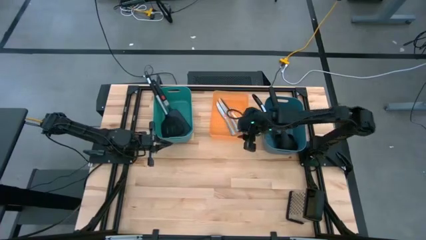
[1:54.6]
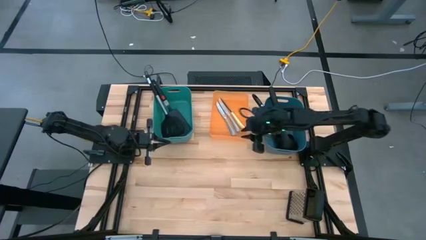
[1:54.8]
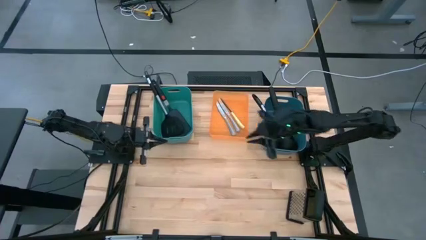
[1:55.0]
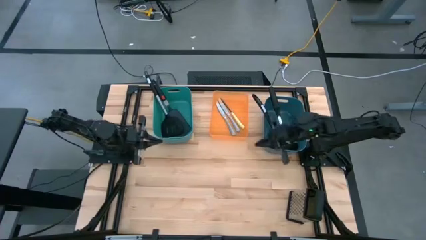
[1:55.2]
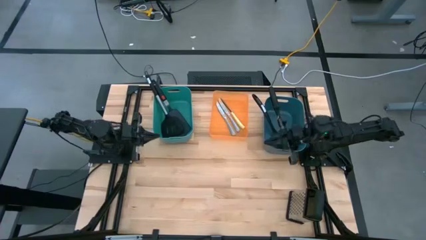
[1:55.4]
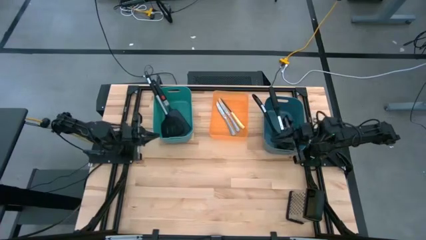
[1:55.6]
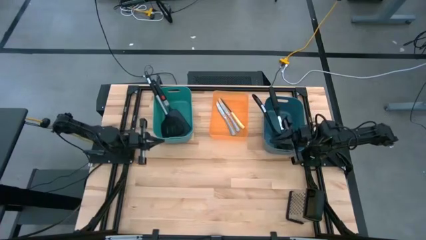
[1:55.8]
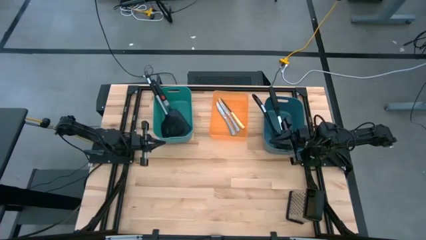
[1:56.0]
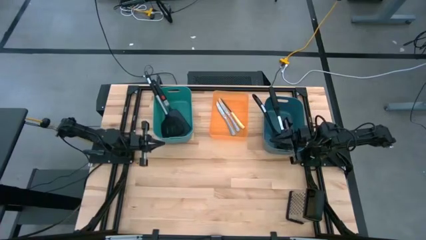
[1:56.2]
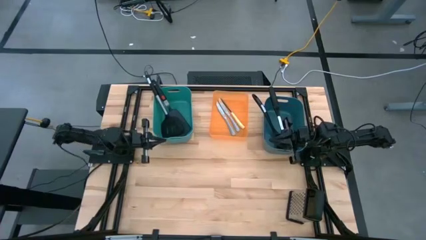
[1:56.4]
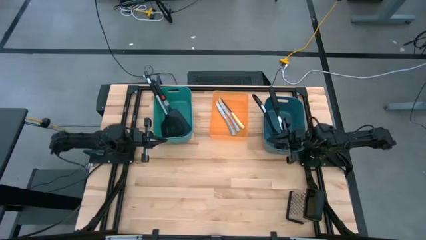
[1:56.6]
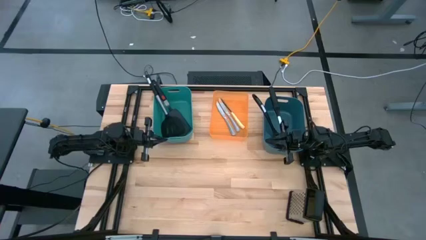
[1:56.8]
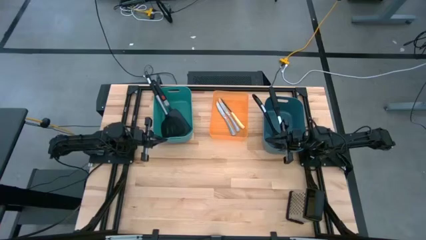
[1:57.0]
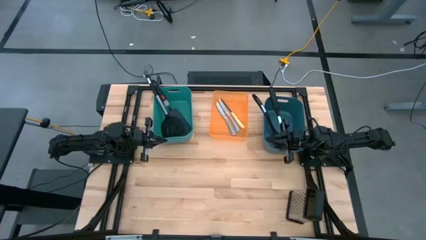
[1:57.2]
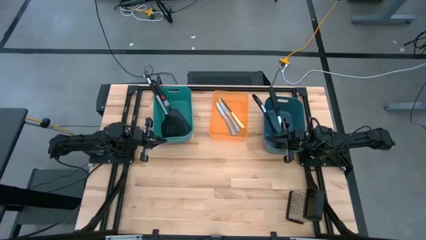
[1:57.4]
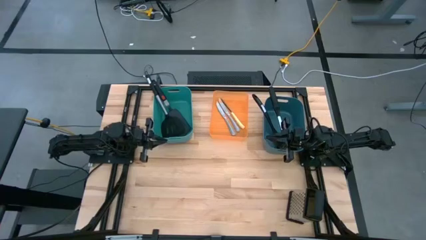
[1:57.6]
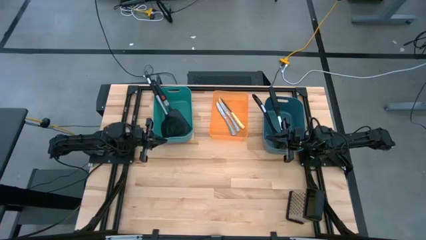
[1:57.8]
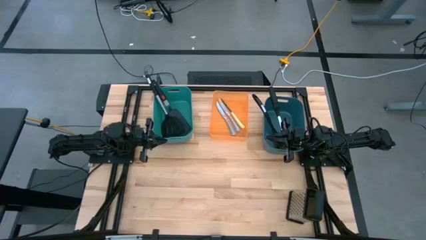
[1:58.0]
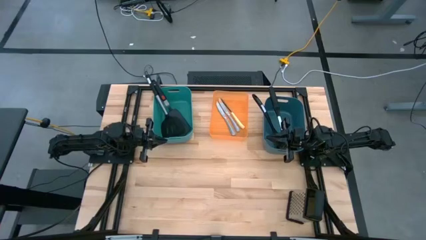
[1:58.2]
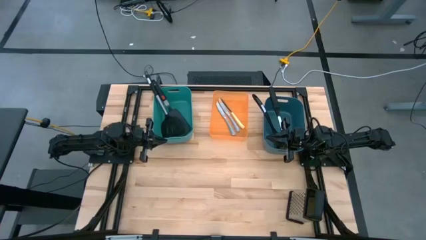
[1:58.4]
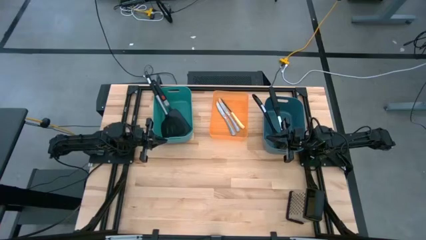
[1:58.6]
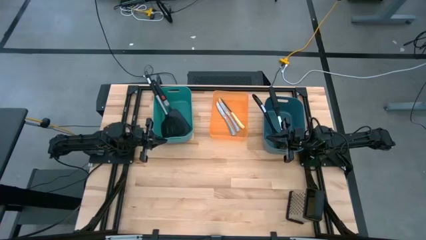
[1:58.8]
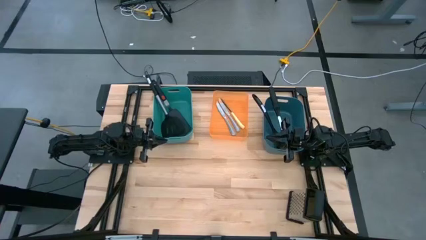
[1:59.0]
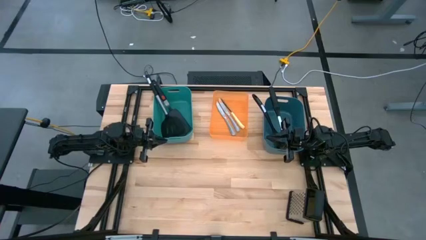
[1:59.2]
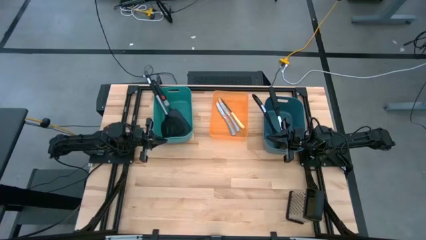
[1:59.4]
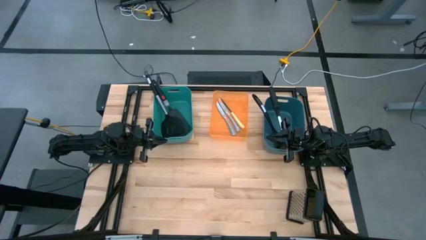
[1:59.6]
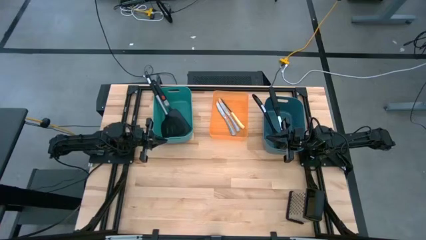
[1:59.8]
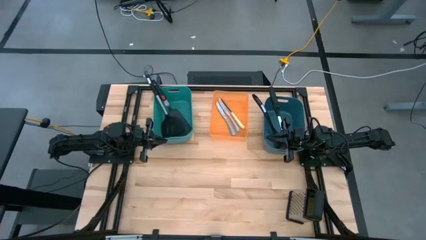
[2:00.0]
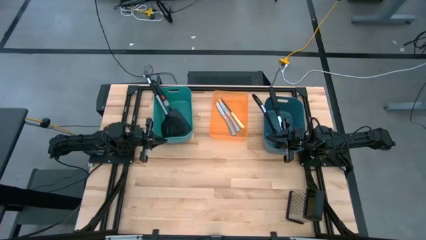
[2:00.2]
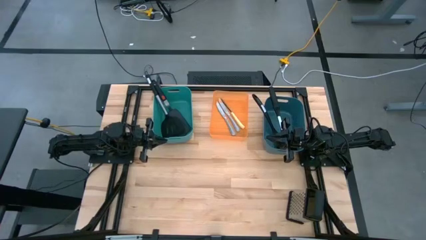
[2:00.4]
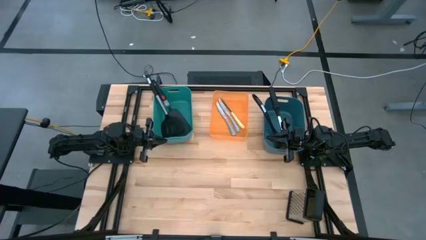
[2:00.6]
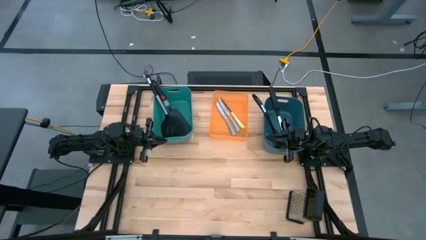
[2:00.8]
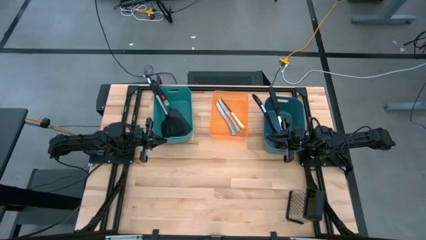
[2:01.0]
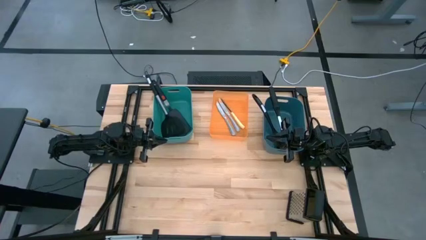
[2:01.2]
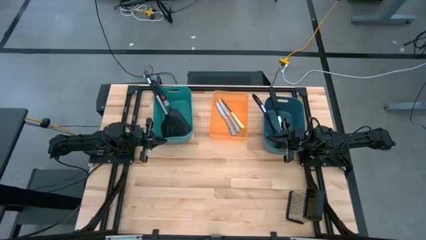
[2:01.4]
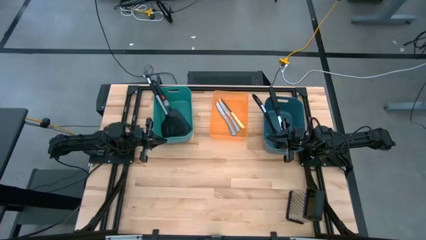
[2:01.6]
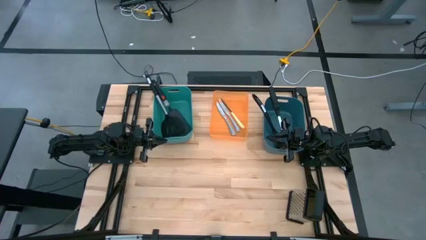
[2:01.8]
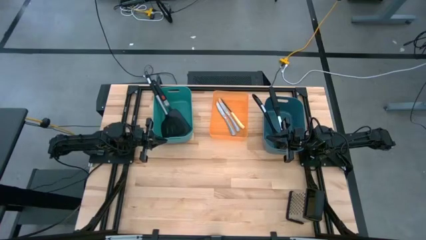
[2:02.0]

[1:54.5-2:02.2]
Task: Pick & Place Kitchen Items
Return to Home Position

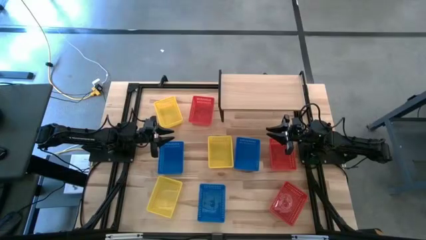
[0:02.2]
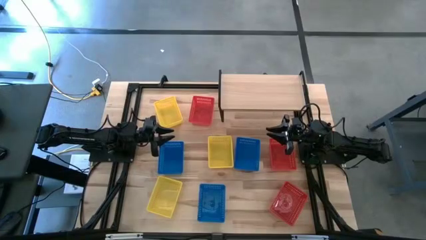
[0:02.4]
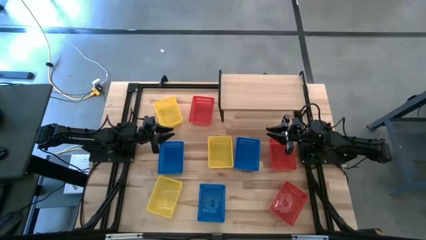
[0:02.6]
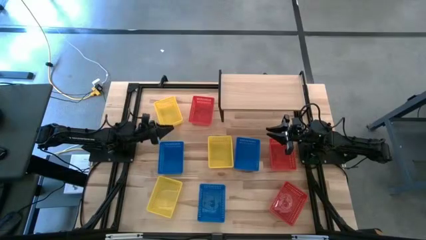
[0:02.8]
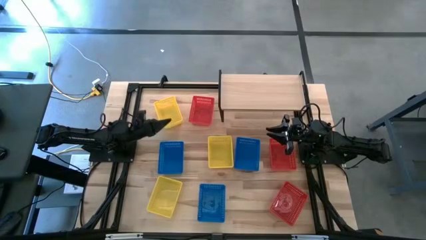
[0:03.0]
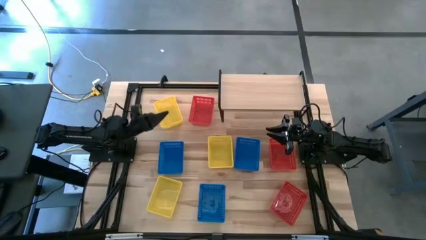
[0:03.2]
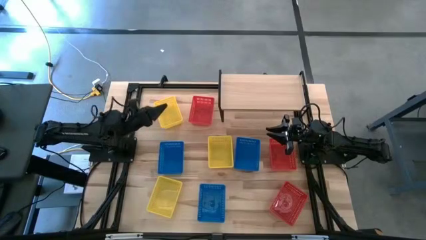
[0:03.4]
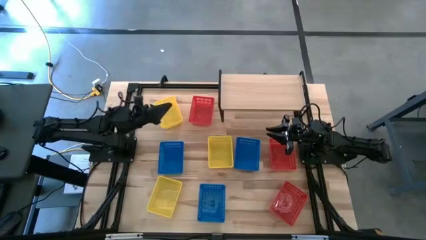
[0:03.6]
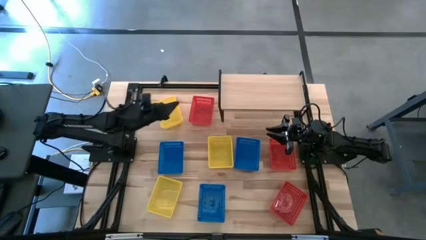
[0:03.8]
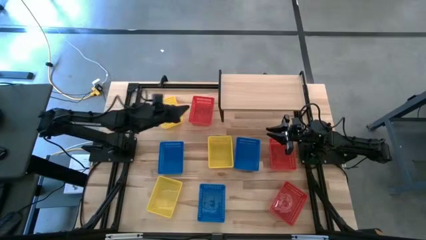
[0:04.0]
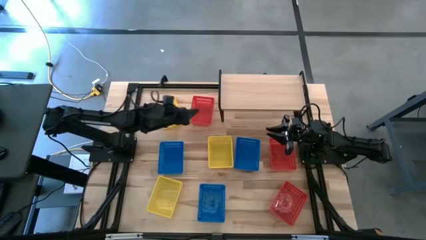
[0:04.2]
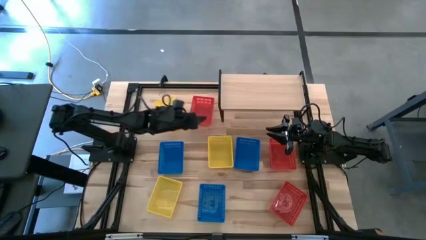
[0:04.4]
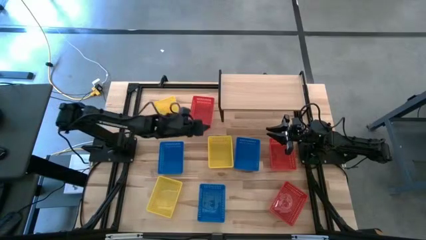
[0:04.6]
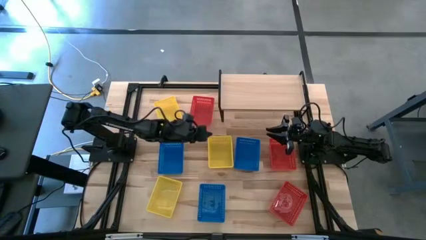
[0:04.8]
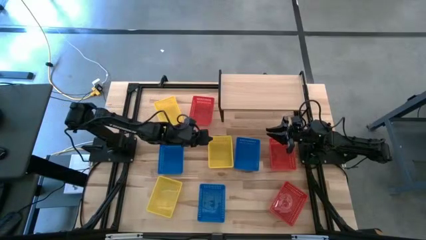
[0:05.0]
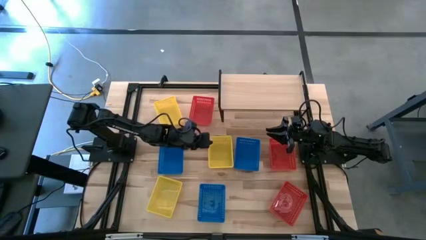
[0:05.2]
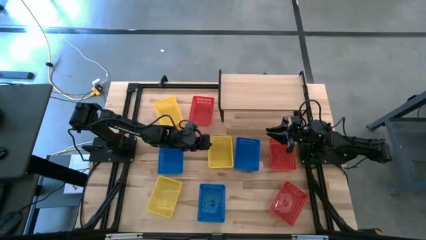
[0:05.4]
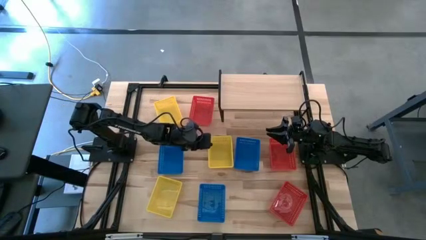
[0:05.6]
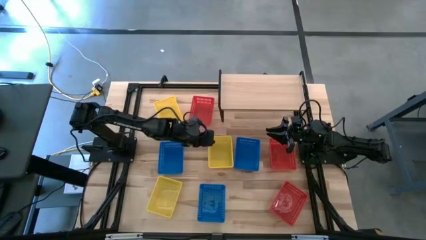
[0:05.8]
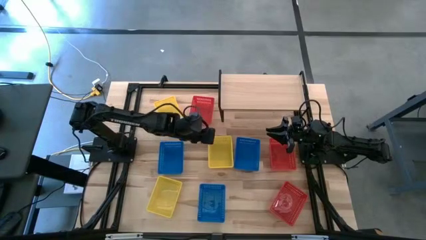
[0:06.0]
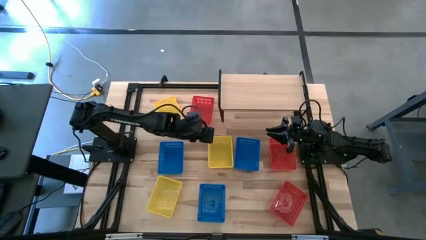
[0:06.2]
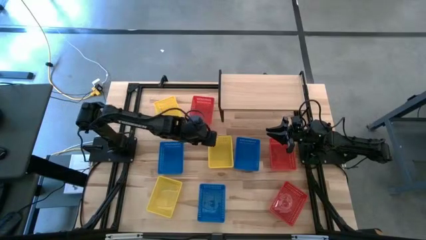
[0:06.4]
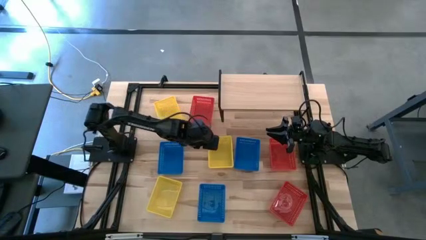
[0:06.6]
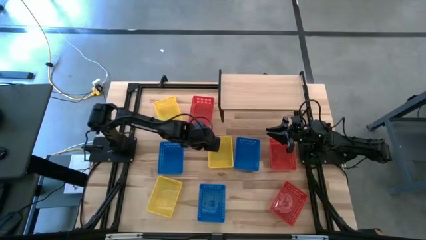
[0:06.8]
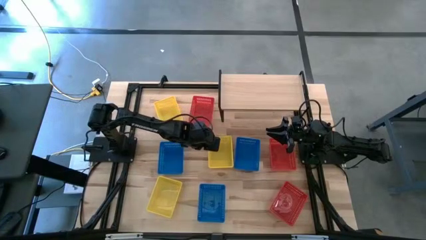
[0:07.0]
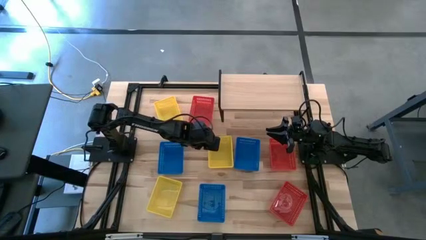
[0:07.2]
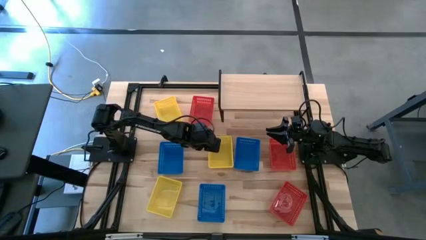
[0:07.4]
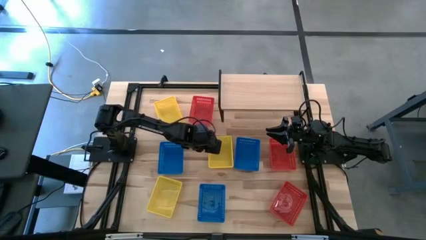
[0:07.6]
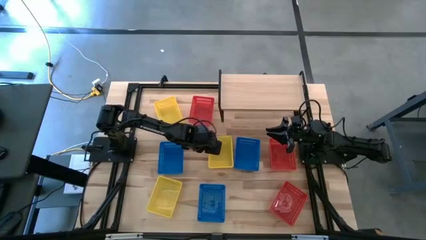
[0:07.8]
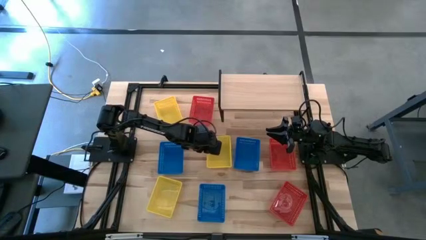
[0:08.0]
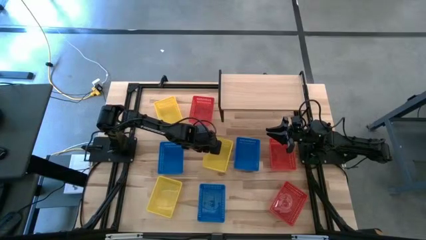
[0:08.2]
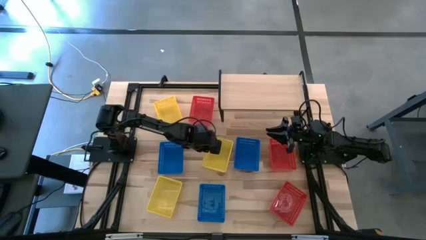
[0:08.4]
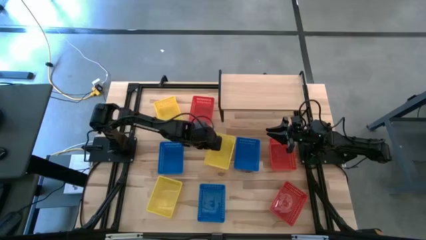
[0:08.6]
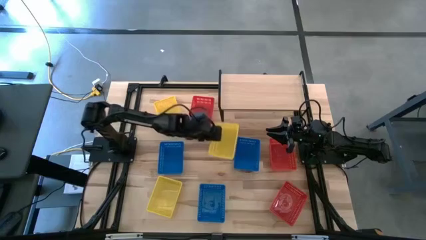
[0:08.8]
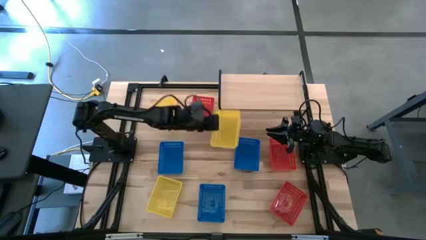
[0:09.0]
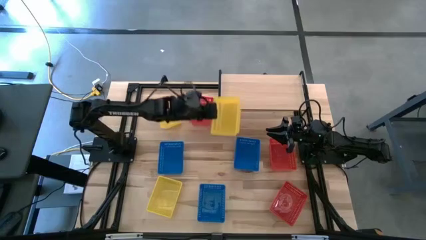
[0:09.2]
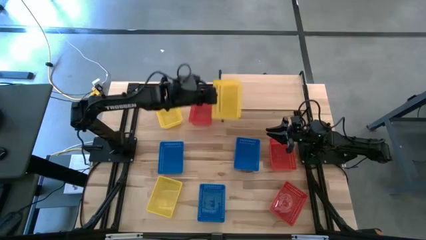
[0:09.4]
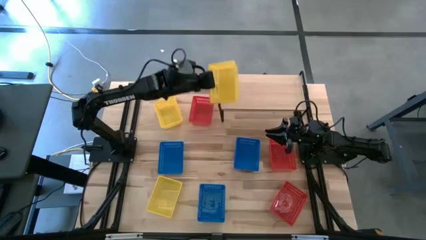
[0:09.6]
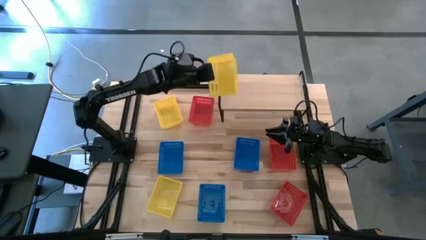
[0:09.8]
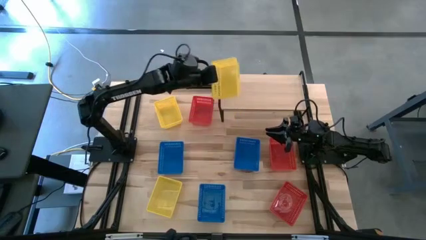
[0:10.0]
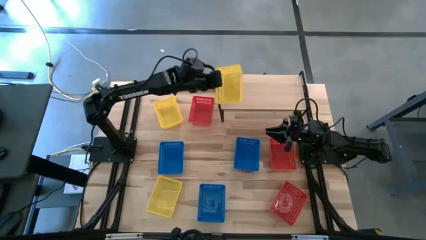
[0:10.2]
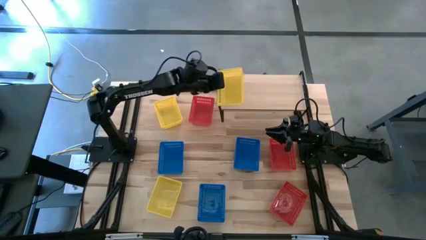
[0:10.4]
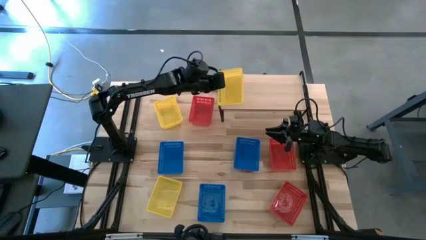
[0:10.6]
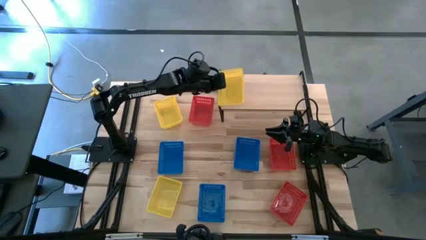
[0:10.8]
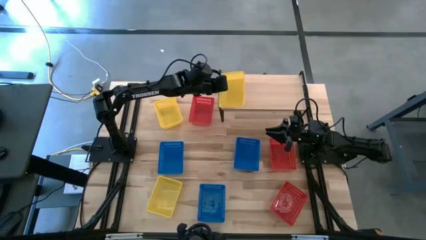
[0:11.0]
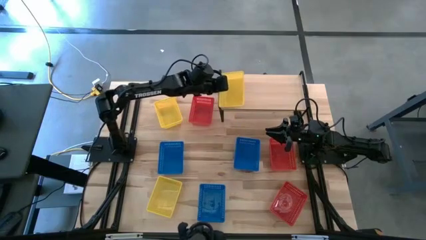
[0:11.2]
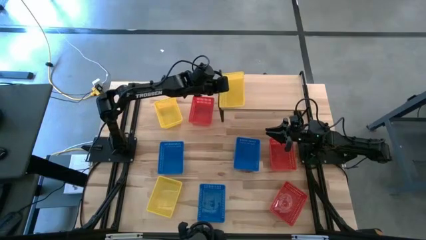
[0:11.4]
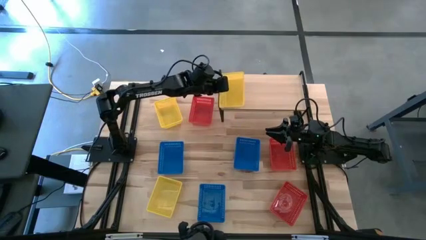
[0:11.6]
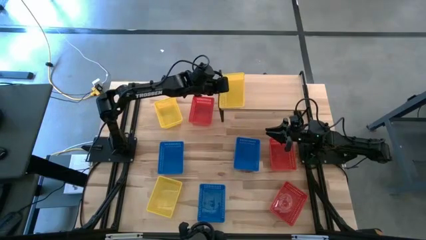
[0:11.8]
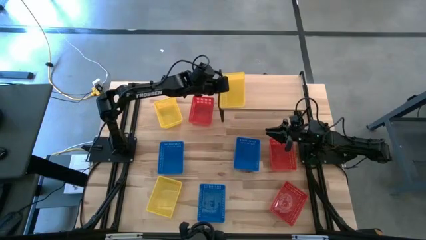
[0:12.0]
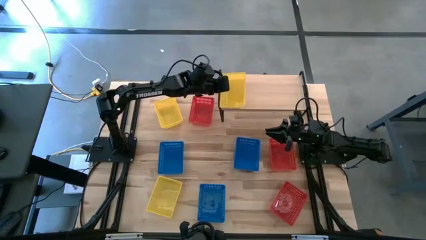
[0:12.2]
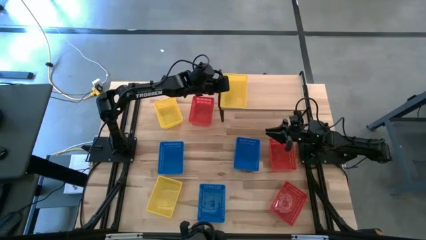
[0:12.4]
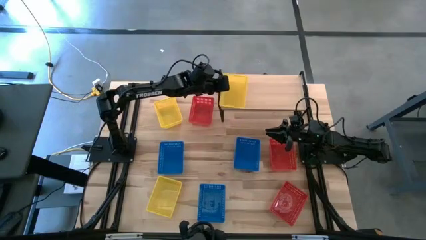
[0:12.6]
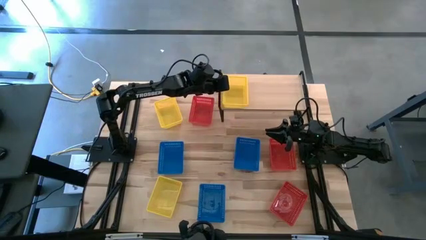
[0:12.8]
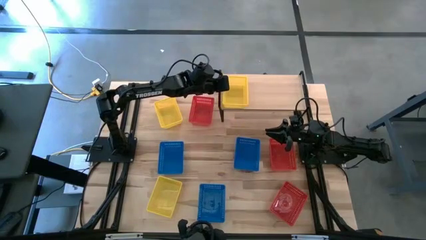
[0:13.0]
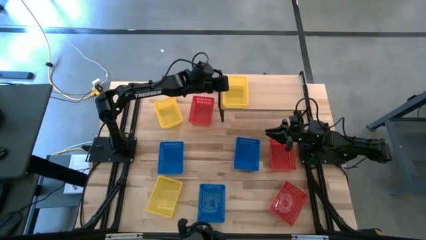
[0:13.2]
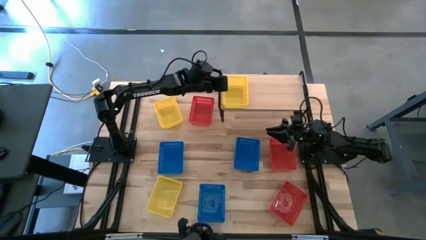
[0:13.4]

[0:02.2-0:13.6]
Task: Stack baskets on shelf by color
Put the middle yellow bin on the shelf
